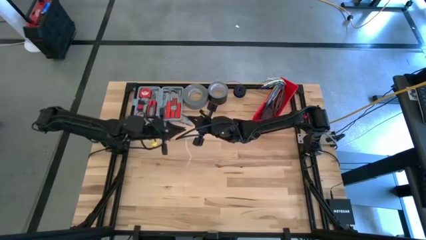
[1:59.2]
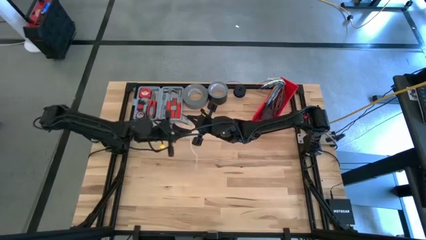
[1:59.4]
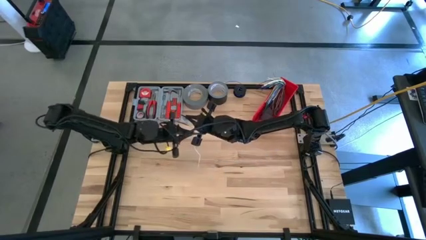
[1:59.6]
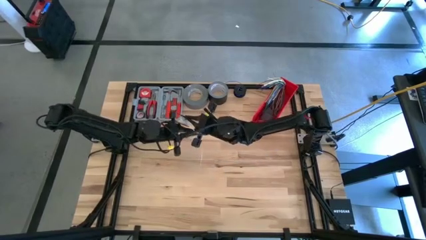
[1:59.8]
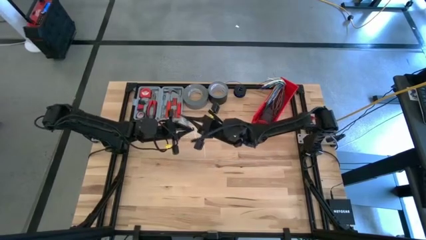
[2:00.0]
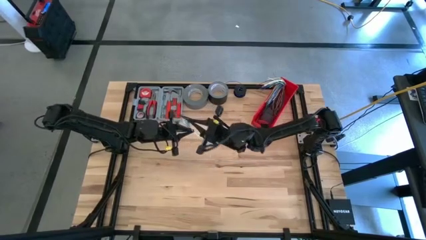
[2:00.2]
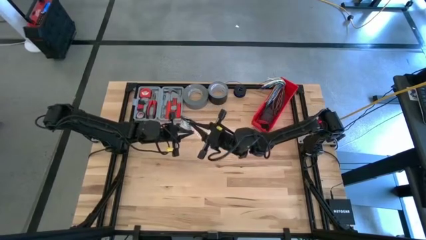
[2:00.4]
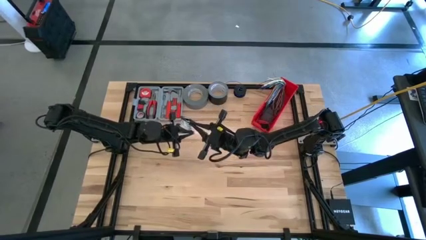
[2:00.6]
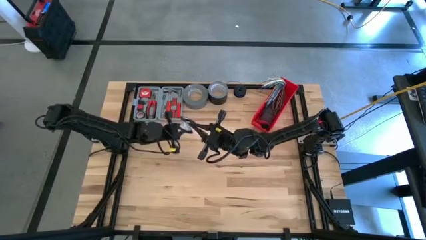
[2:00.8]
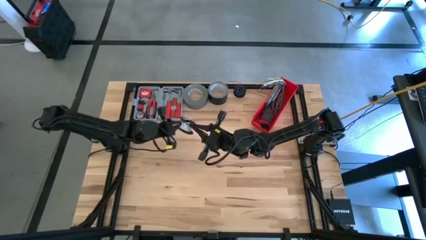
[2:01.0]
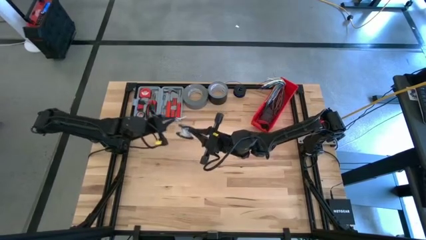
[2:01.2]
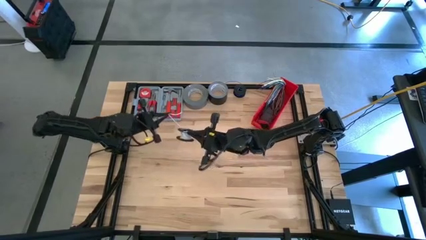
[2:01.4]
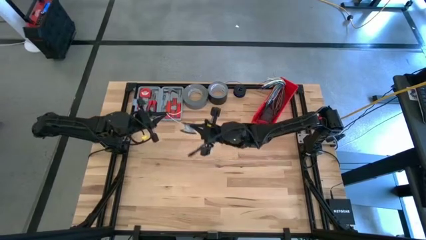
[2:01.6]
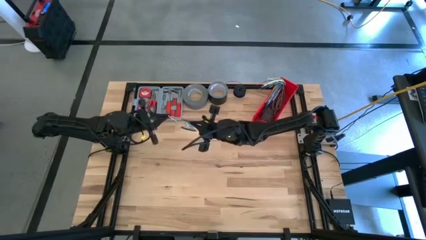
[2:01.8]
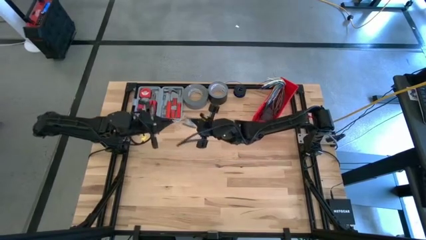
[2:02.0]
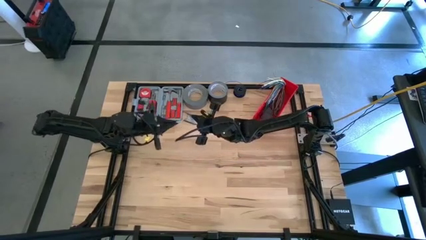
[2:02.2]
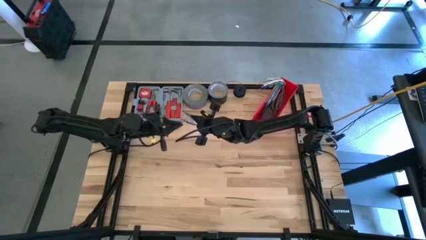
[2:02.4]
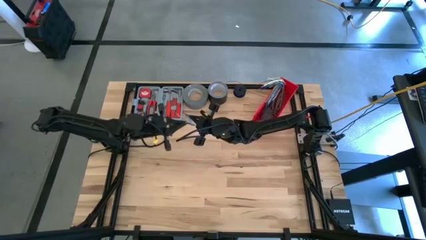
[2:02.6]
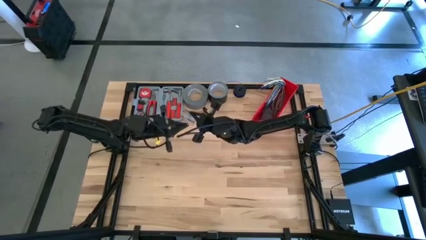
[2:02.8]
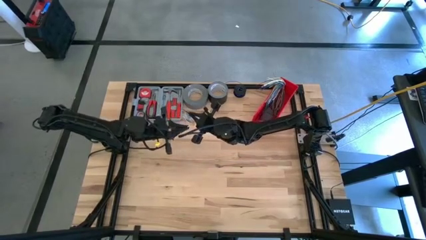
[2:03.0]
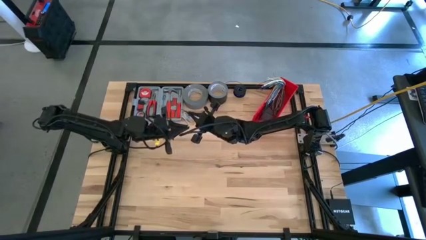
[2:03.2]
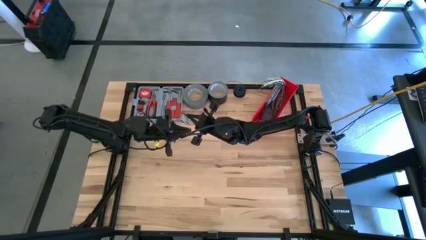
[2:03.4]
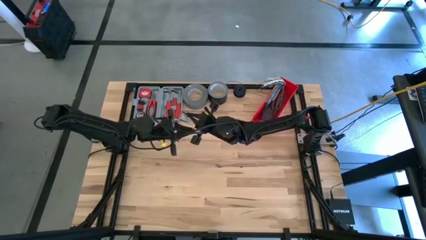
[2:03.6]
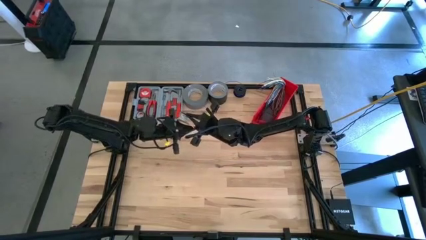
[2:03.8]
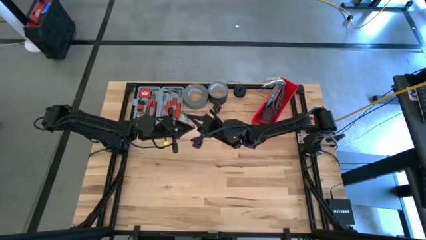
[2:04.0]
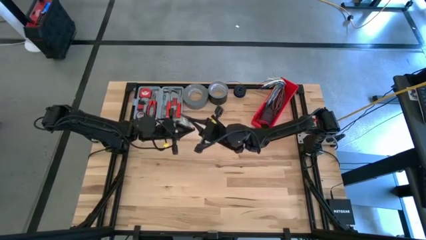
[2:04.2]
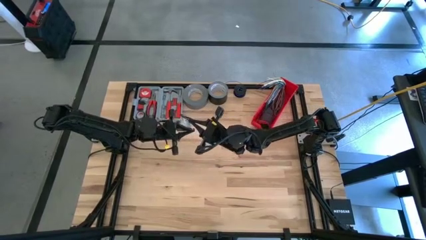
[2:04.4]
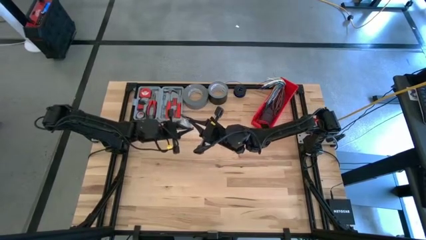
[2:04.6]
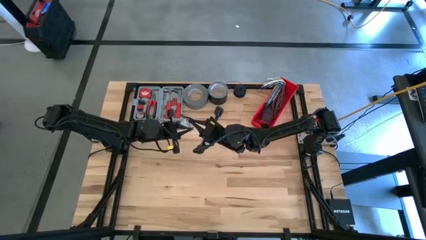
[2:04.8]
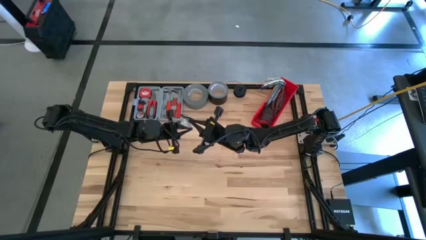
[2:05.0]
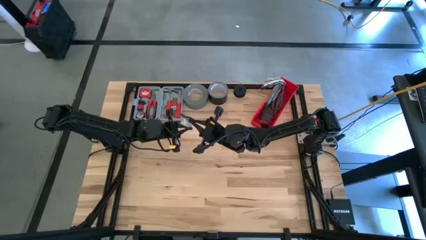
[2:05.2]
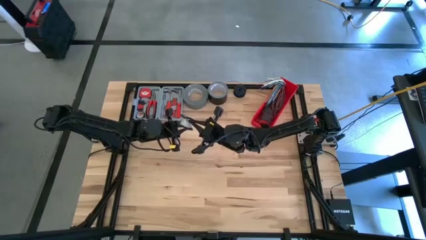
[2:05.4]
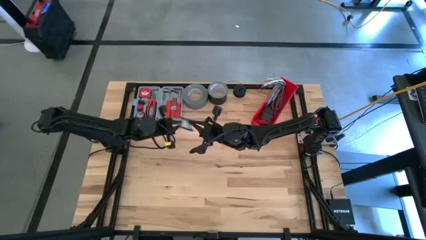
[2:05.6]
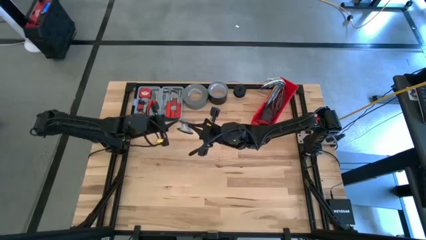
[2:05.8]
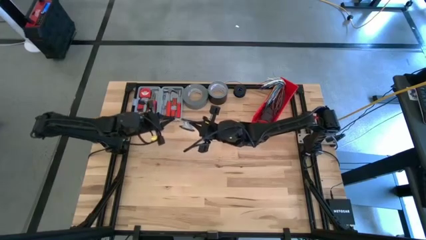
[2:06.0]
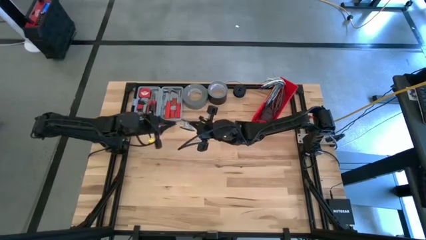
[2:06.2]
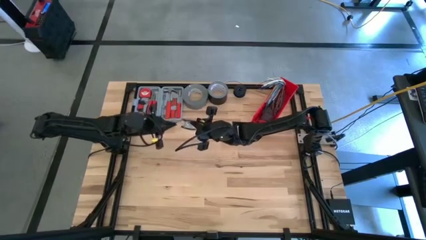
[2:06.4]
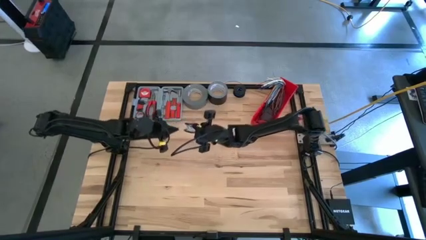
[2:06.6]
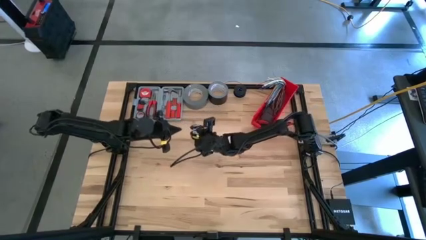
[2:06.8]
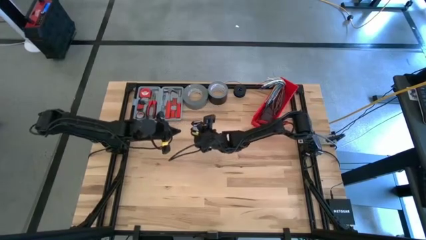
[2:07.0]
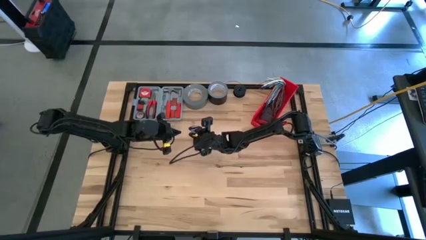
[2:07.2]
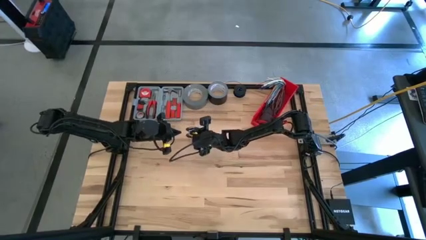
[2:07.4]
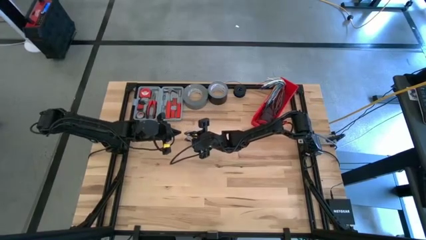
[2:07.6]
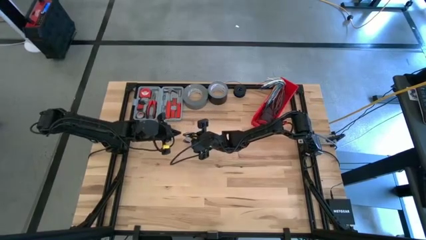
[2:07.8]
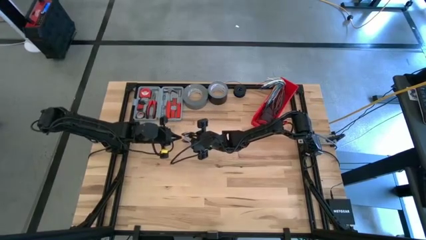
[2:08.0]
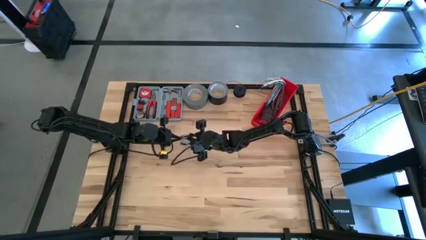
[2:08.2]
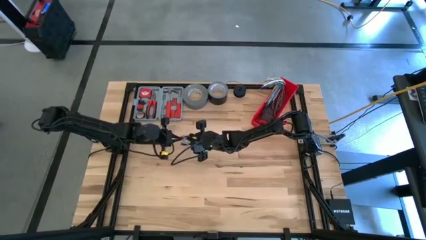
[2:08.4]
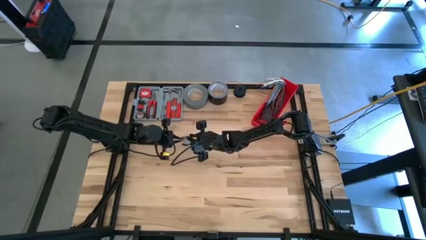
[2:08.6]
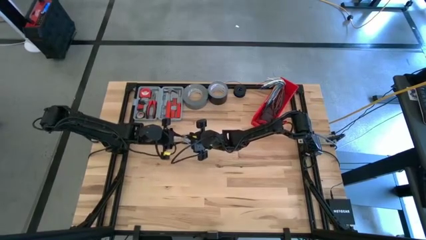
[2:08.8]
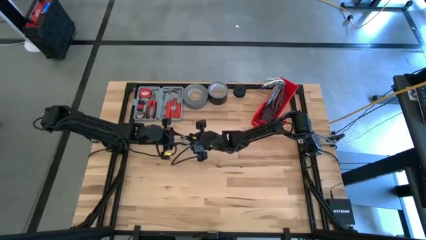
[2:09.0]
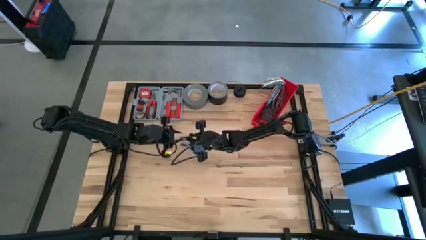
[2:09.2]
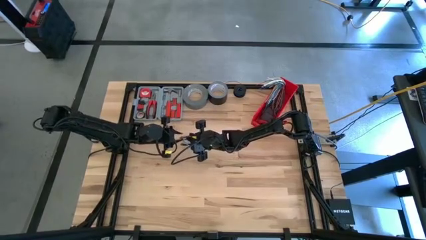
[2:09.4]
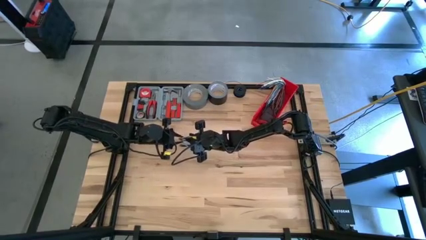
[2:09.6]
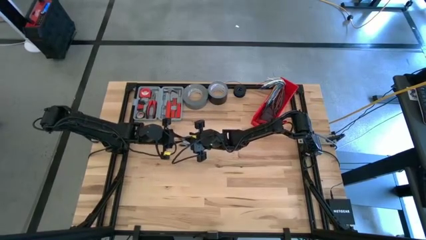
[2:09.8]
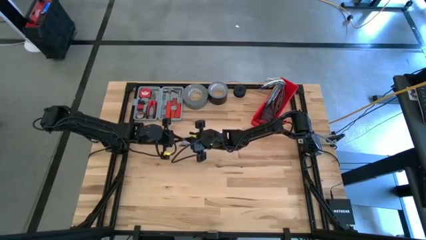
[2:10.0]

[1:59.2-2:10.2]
Task: Coil cords
Coil the white wire on the black spool
